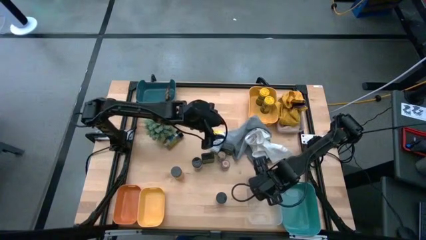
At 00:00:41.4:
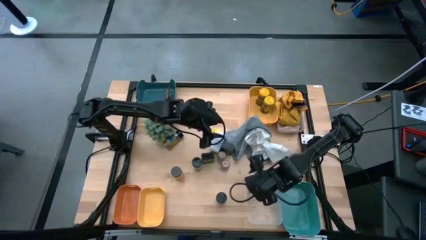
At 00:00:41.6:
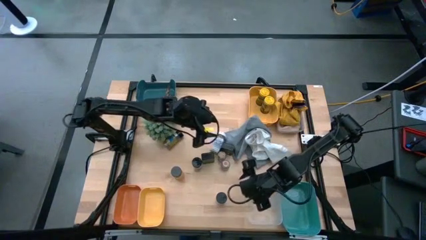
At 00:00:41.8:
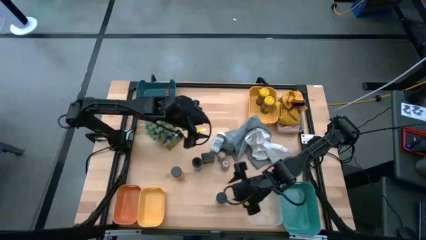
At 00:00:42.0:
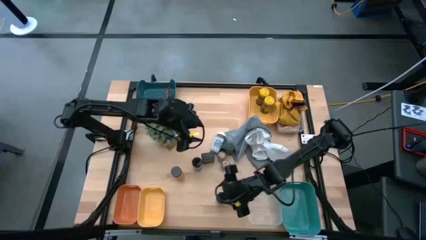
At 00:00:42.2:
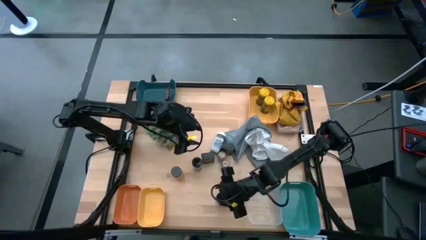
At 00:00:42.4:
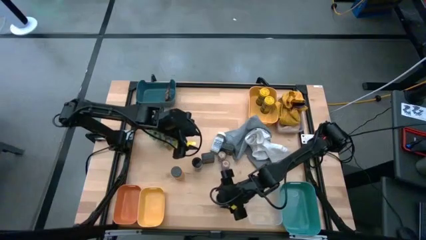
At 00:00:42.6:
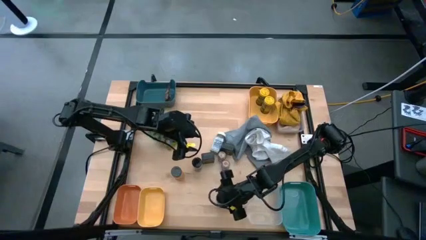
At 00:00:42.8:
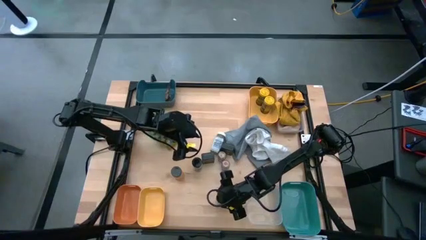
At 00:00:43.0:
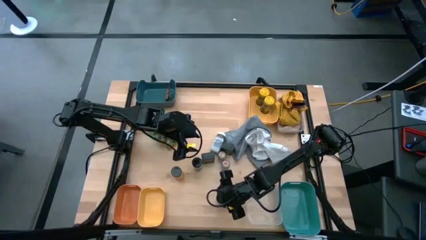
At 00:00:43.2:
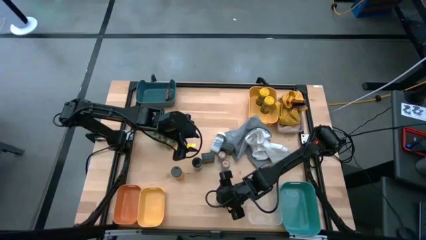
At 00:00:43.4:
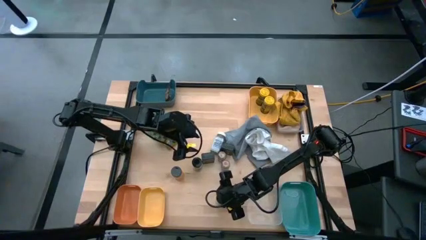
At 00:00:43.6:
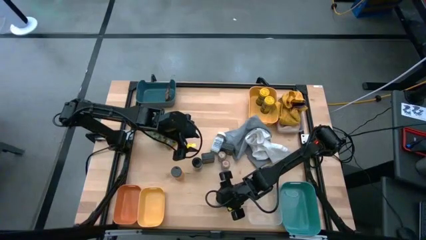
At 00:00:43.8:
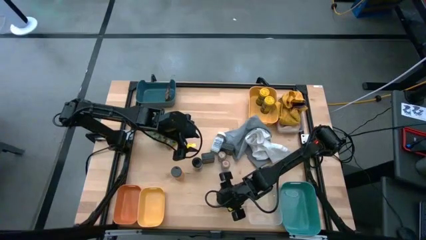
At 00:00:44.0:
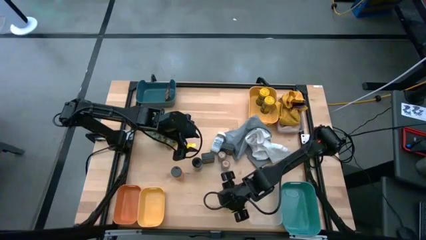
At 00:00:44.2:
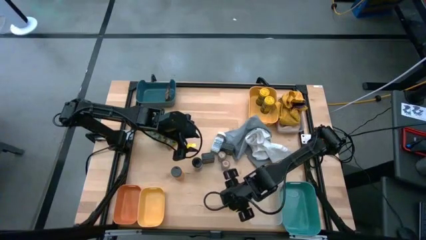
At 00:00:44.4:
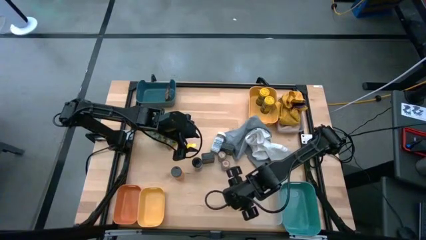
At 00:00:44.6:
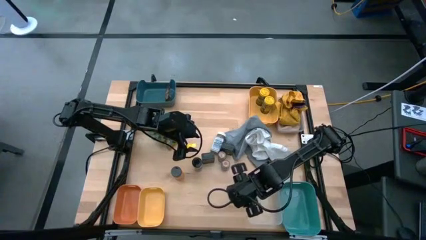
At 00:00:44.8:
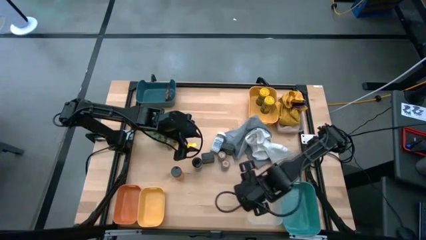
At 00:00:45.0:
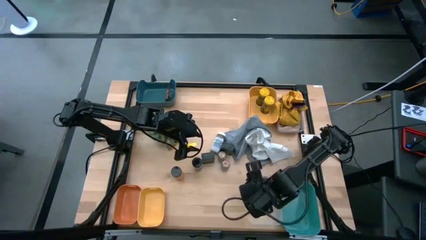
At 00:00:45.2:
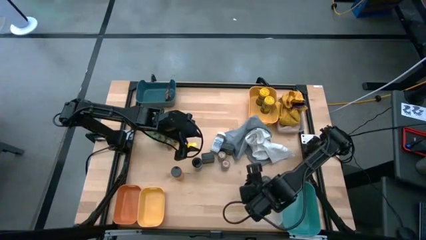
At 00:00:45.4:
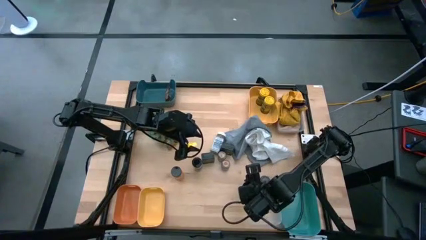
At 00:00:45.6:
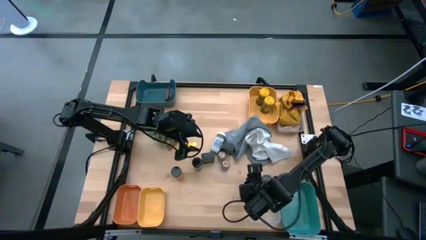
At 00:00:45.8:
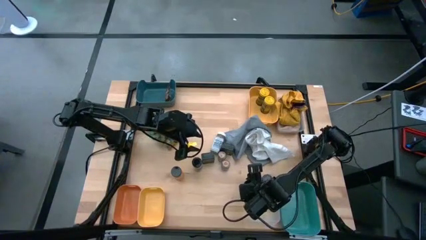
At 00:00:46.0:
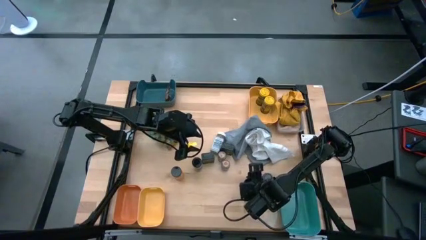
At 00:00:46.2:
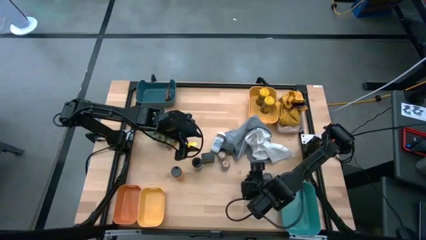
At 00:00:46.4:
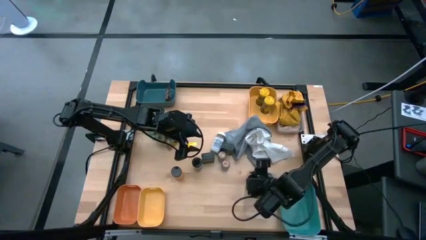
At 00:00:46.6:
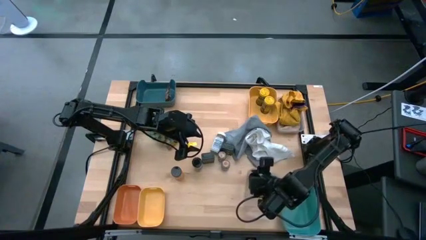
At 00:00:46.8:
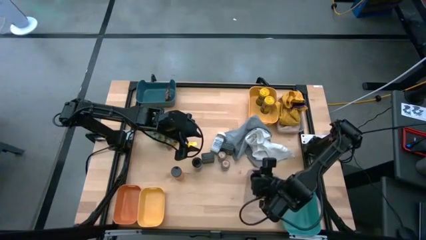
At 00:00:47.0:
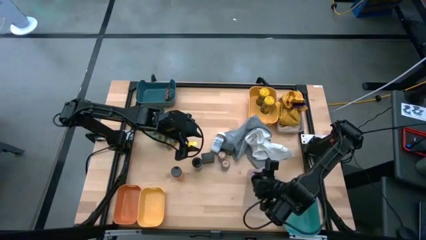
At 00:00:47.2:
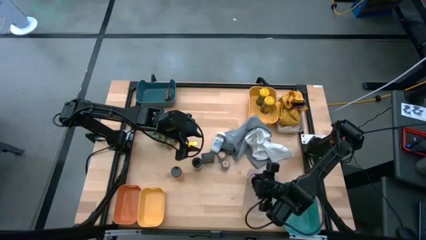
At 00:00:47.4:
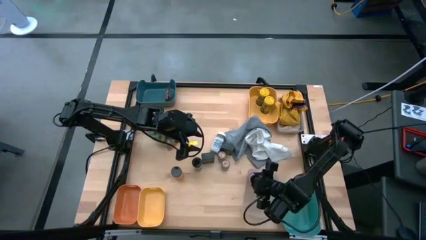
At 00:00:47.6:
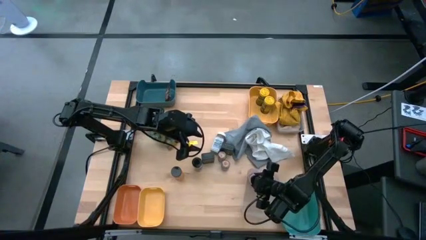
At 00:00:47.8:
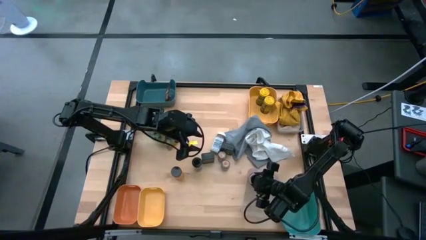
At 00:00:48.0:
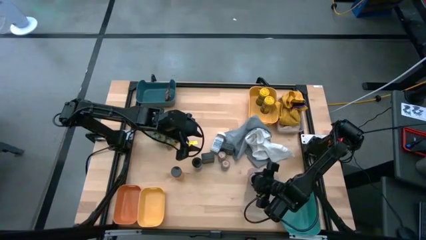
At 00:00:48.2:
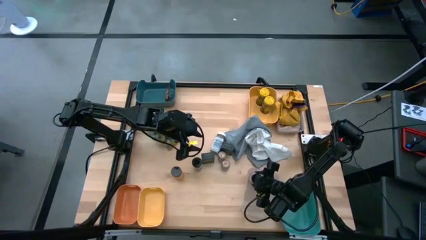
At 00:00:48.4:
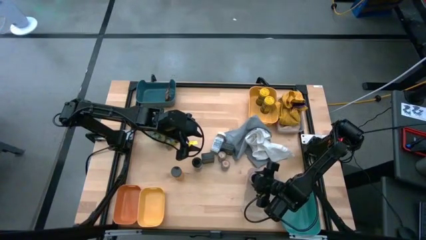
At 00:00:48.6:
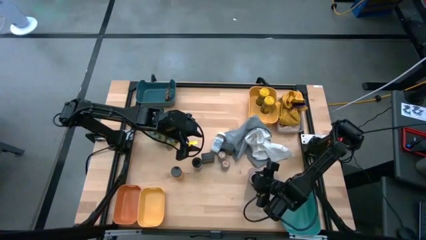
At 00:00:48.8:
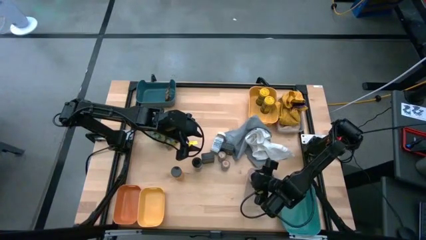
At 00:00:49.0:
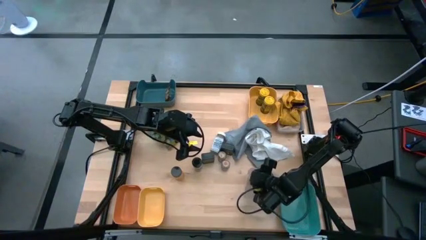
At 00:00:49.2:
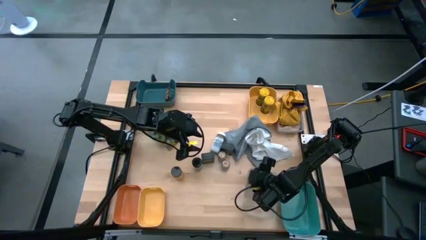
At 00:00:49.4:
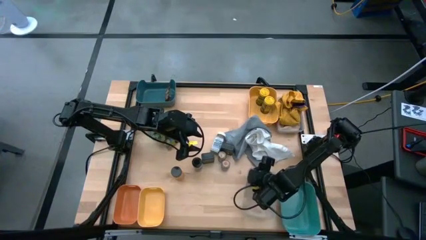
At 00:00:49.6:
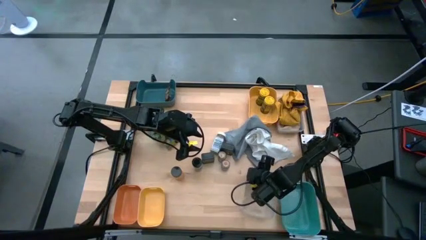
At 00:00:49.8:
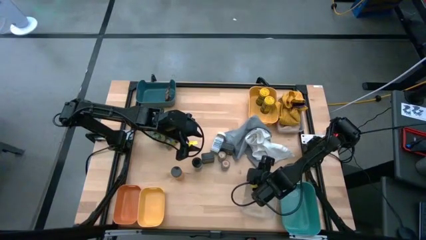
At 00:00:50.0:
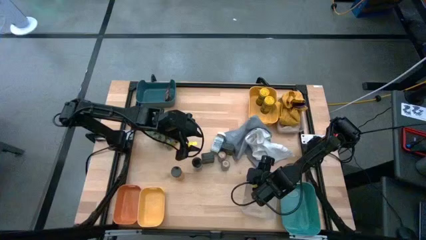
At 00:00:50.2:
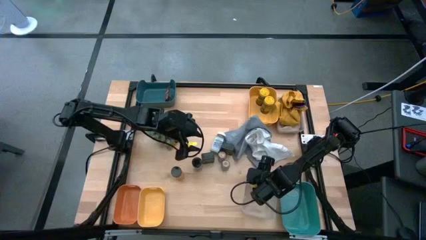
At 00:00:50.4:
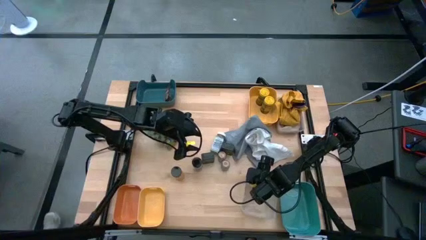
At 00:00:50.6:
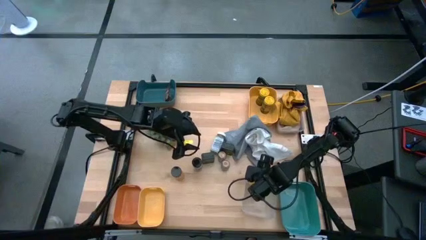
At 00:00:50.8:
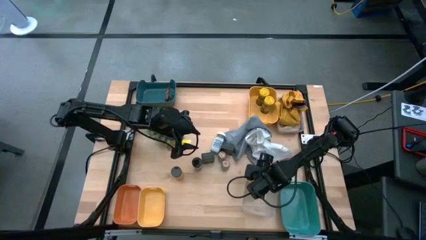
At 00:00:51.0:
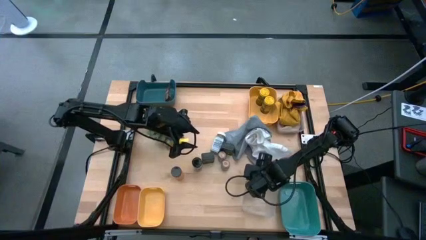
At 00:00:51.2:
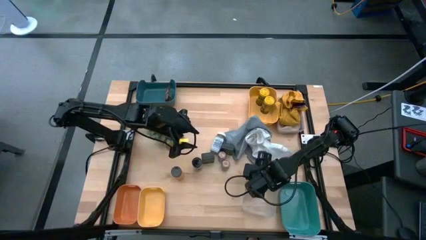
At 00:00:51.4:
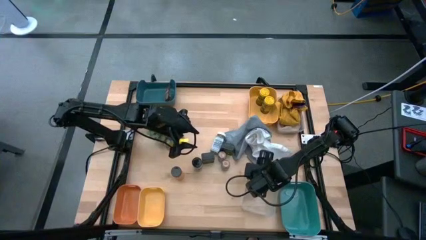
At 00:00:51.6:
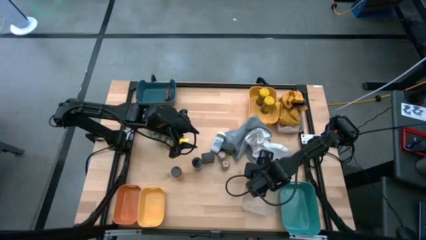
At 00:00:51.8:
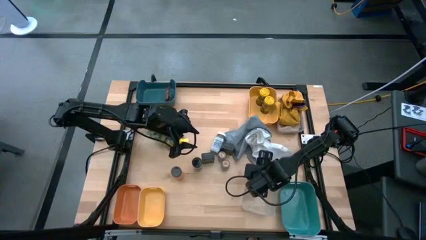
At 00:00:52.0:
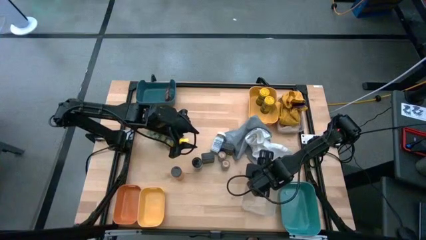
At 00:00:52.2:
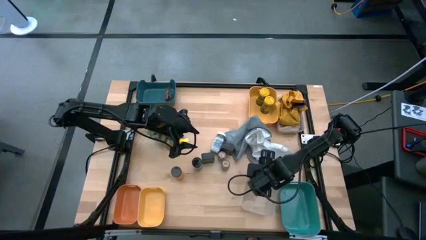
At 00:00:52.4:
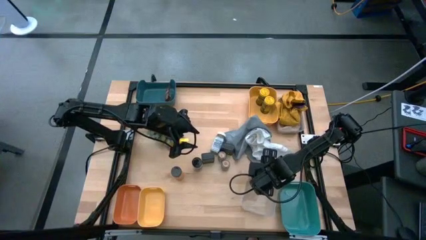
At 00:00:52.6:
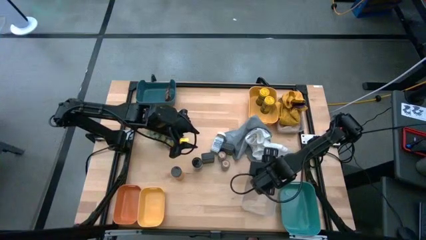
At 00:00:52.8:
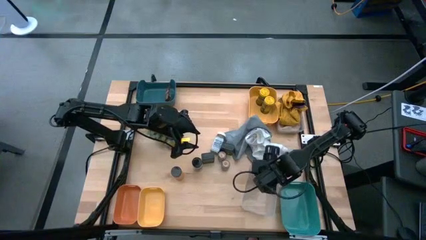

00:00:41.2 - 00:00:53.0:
Task: Sort spices by type
Put the black seasoning bottle into the transparent bin

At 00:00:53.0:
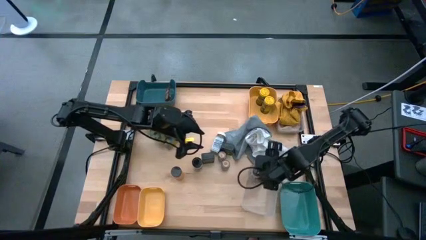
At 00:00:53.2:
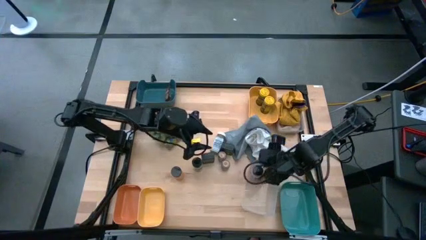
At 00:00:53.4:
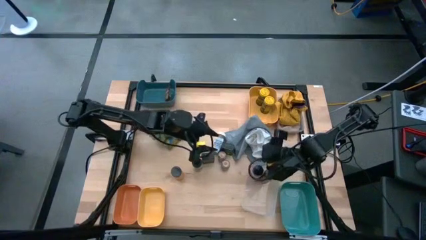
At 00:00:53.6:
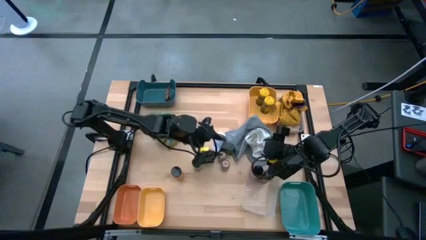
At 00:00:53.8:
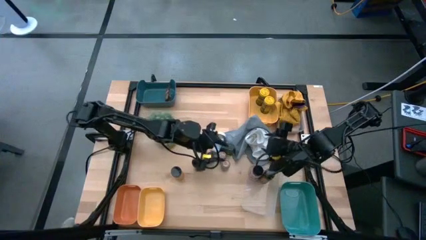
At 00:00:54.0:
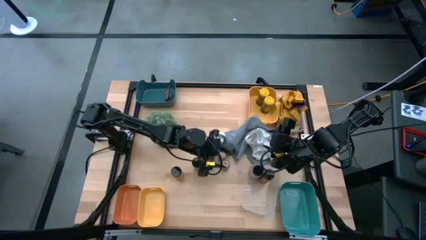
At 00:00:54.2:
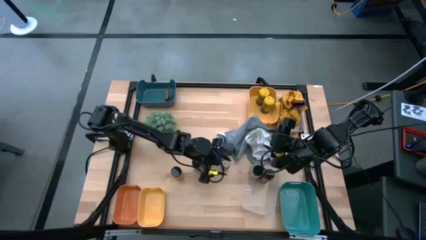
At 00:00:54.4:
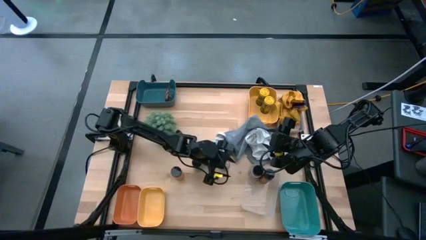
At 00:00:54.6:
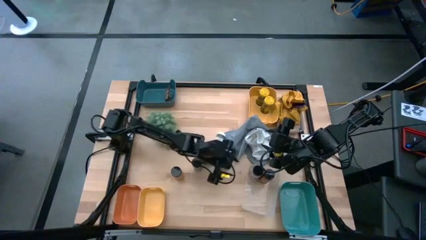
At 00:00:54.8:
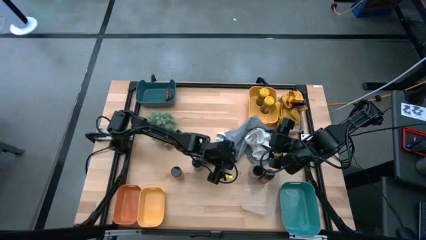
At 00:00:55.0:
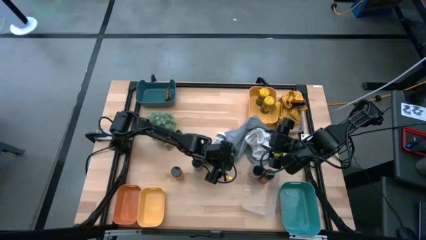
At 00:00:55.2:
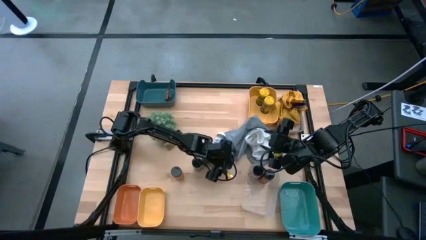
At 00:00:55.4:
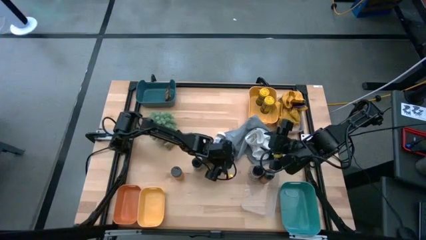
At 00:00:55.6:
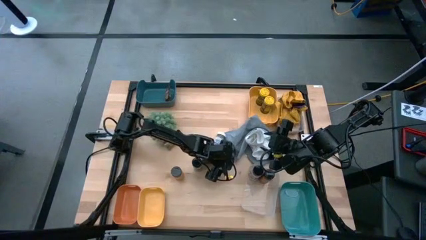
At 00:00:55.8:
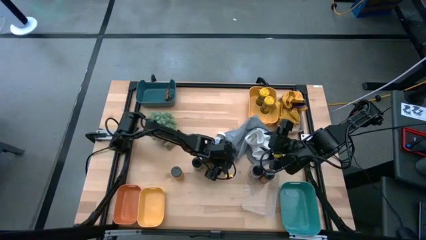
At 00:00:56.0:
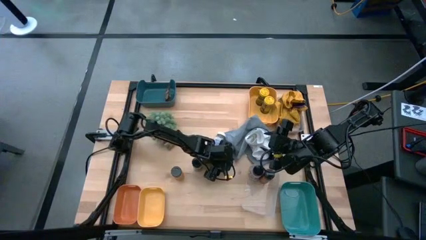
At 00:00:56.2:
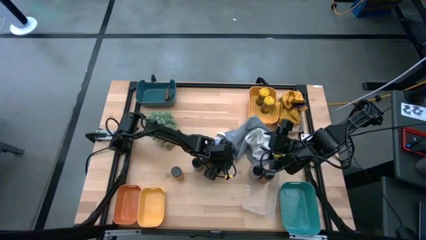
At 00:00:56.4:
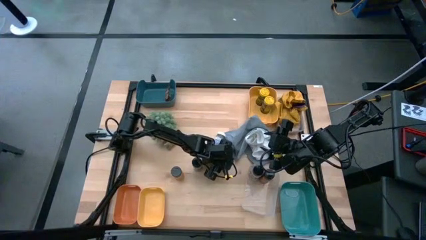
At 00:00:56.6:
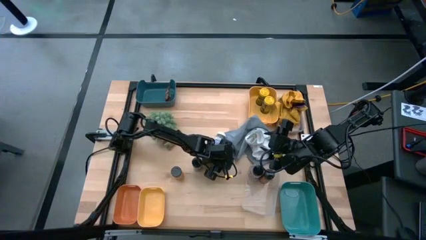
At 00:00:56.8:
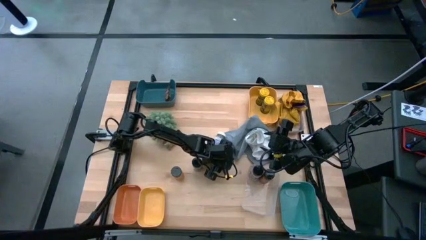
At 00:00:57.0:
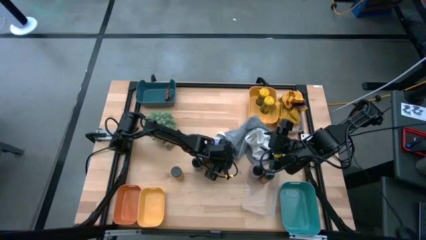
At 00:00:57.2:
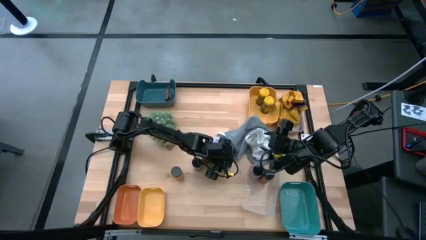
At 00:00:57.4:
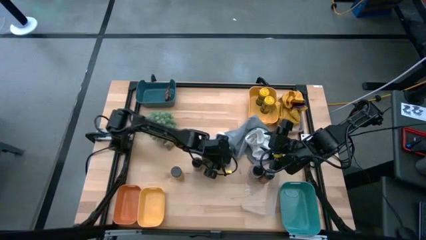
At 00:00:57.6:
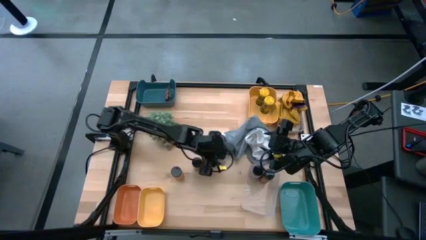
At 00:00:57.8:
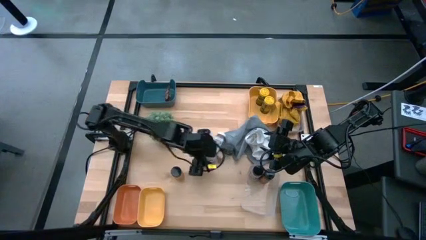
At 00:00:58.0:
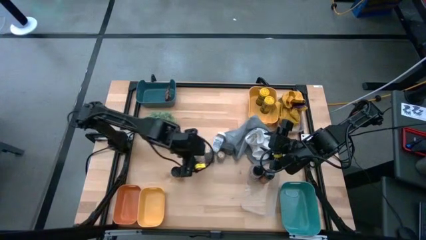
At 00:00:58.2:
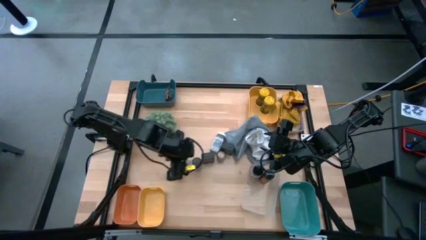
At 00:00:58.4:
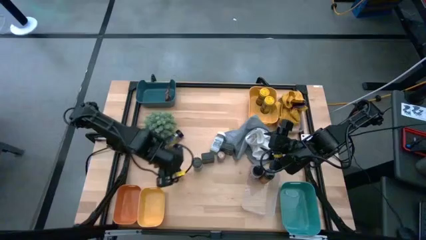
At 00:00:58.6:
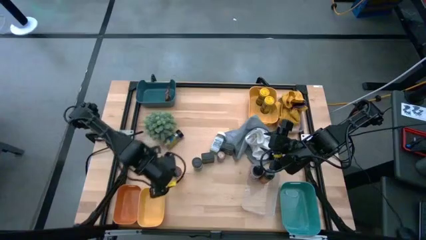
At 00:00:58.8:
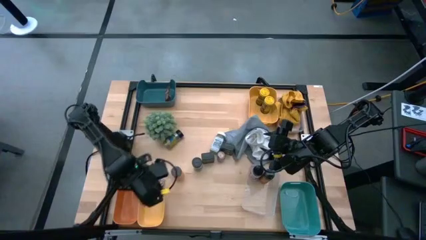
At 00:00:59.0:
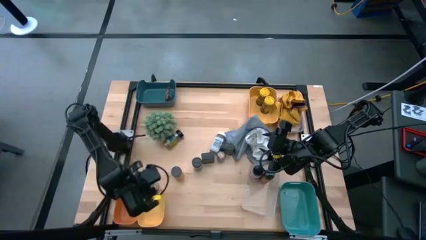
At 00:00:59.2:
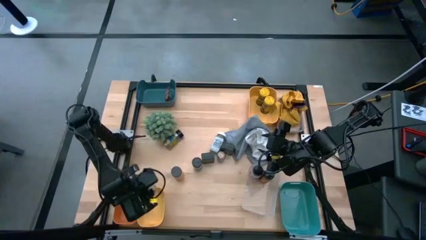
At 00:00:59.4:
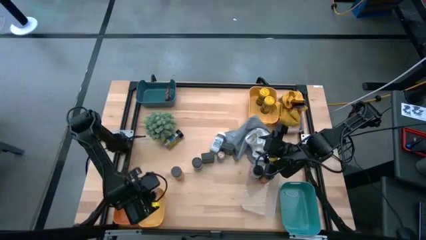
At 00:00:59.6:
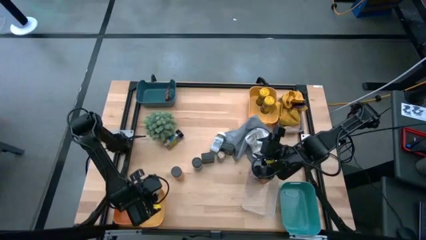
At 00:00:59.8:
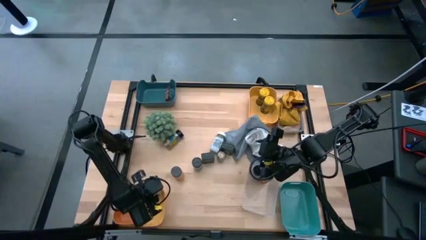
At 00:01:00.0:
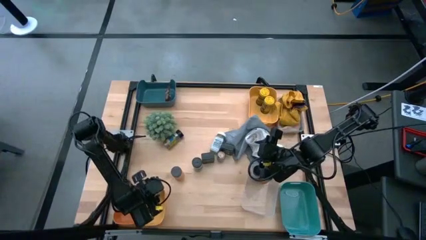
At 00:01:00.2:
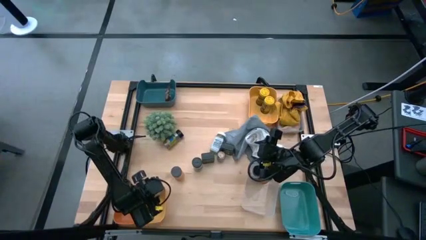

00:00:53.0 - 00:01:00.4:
Put the transparent seasoning bottle into the bottom yellow bin
